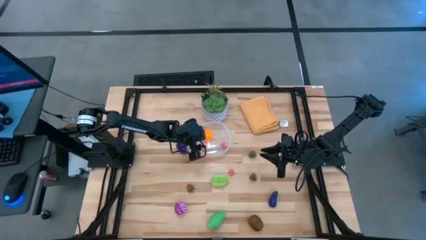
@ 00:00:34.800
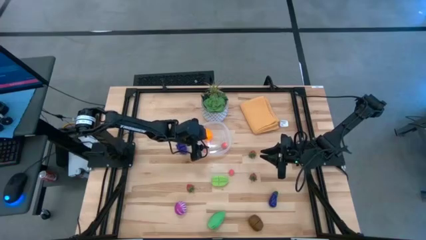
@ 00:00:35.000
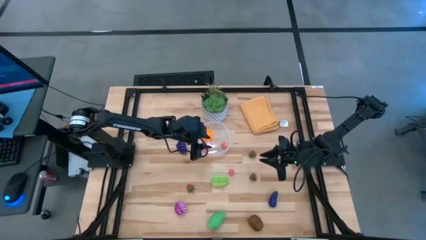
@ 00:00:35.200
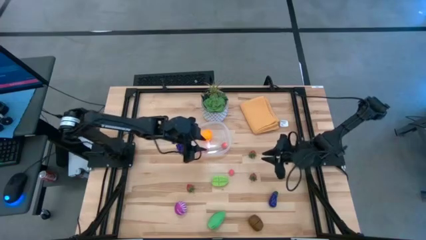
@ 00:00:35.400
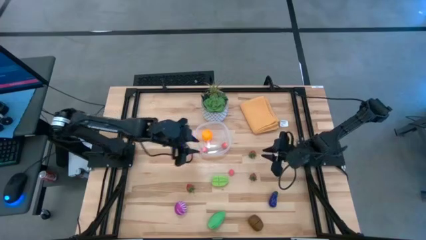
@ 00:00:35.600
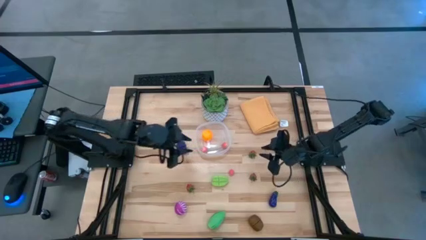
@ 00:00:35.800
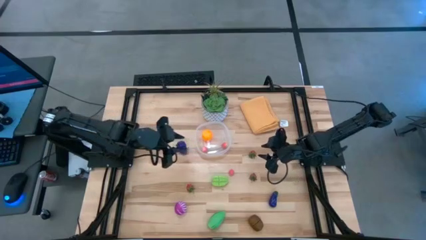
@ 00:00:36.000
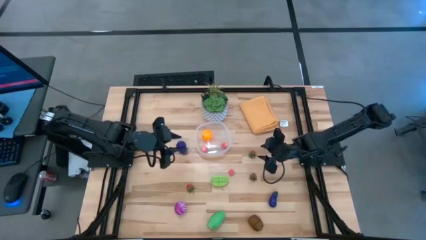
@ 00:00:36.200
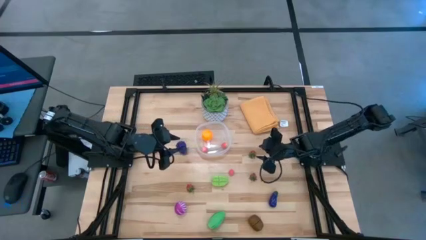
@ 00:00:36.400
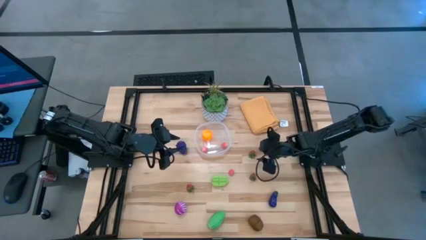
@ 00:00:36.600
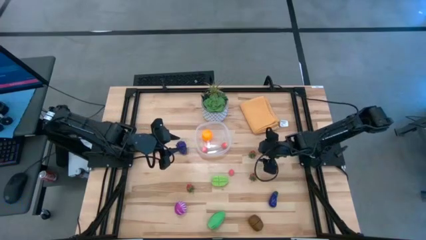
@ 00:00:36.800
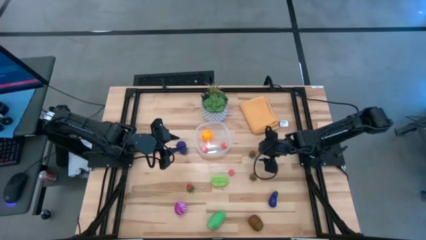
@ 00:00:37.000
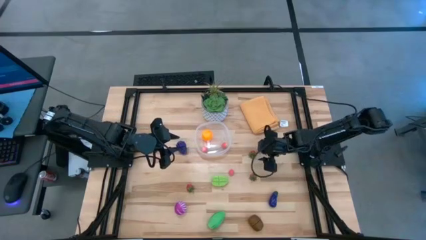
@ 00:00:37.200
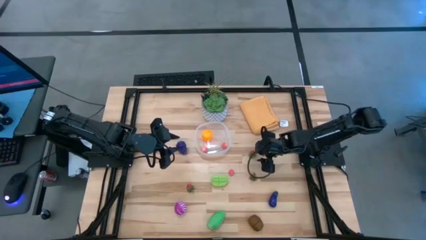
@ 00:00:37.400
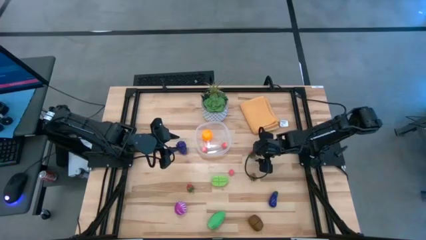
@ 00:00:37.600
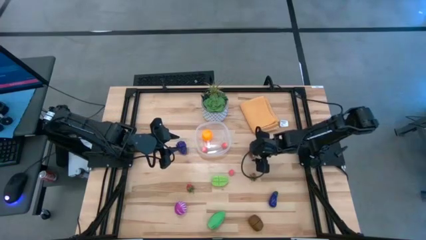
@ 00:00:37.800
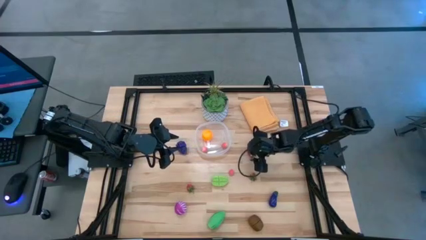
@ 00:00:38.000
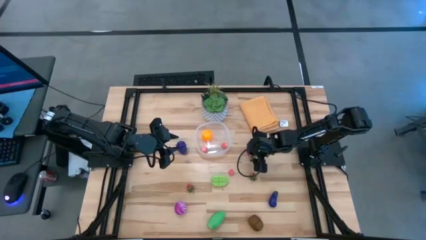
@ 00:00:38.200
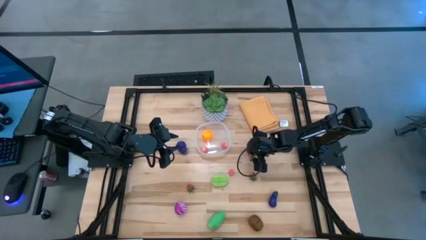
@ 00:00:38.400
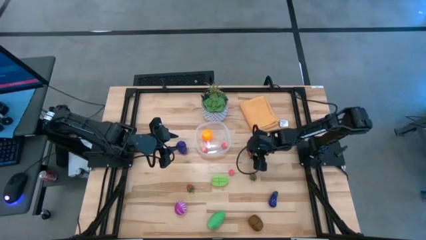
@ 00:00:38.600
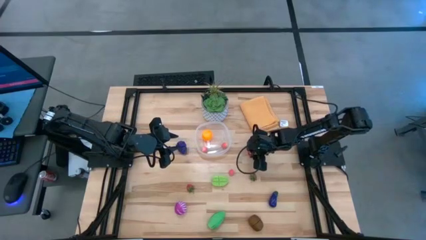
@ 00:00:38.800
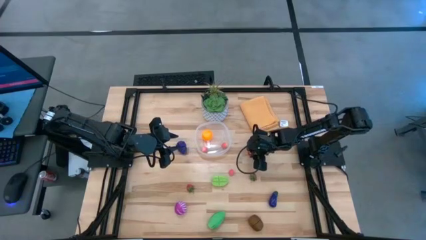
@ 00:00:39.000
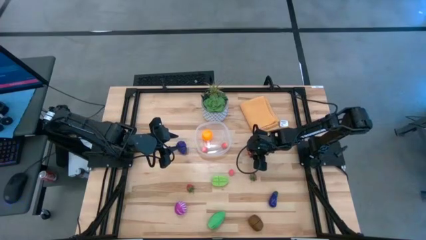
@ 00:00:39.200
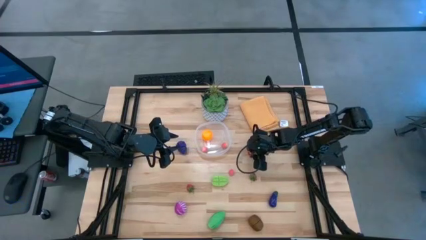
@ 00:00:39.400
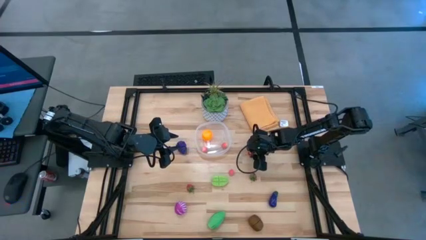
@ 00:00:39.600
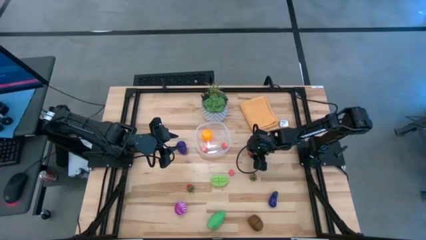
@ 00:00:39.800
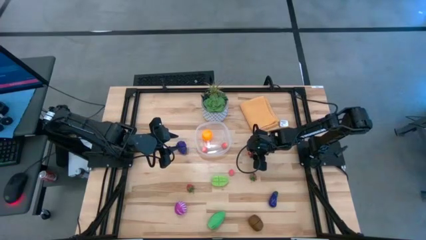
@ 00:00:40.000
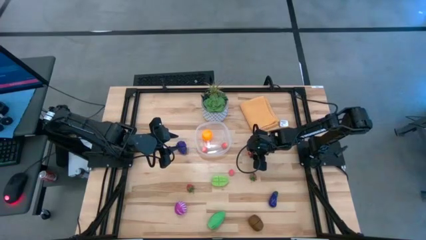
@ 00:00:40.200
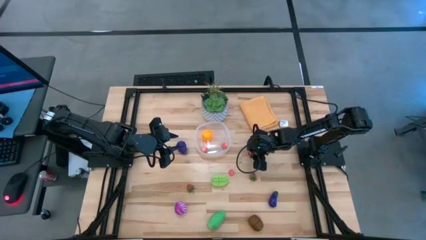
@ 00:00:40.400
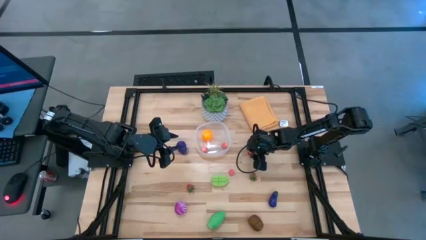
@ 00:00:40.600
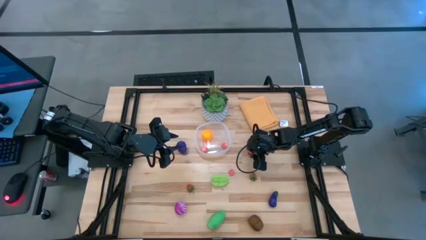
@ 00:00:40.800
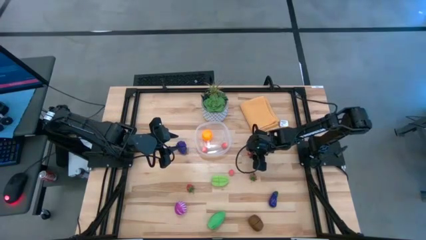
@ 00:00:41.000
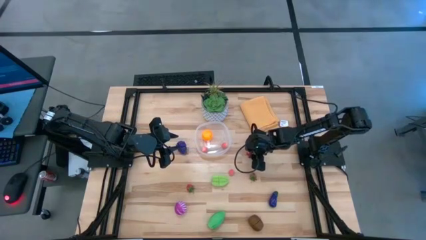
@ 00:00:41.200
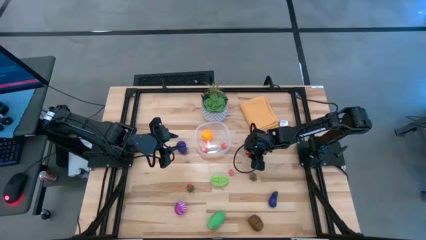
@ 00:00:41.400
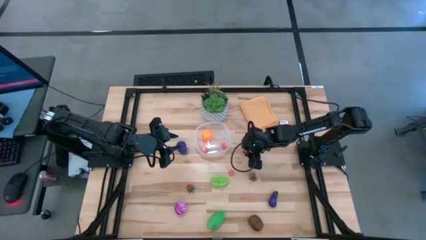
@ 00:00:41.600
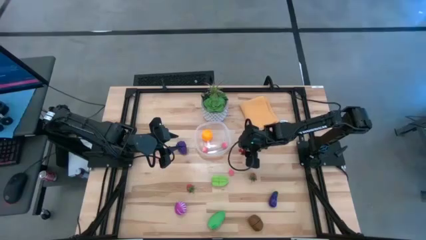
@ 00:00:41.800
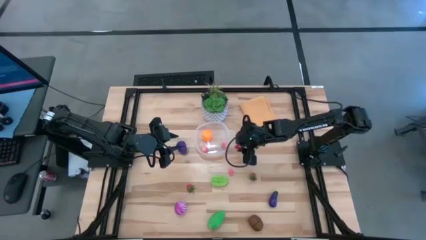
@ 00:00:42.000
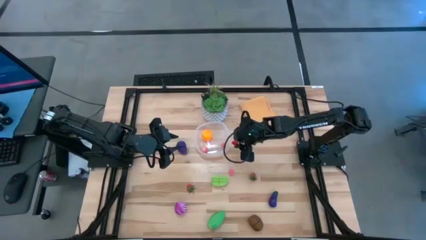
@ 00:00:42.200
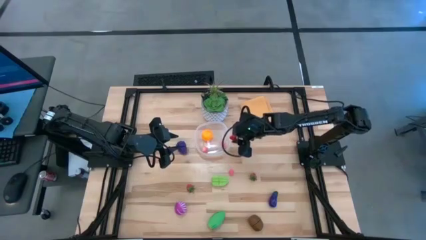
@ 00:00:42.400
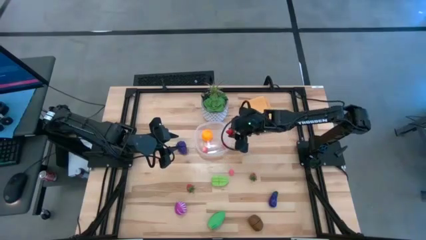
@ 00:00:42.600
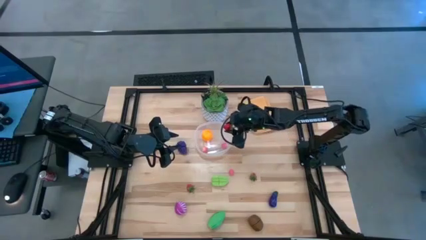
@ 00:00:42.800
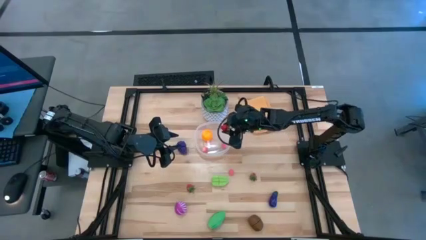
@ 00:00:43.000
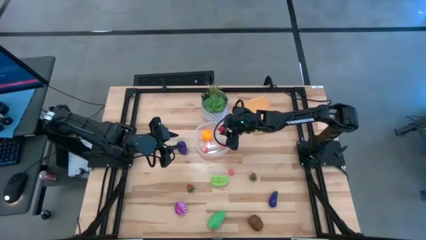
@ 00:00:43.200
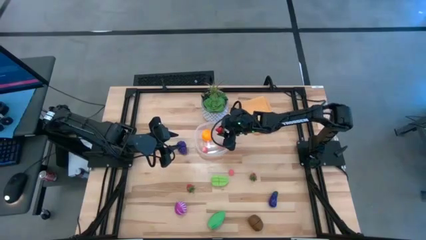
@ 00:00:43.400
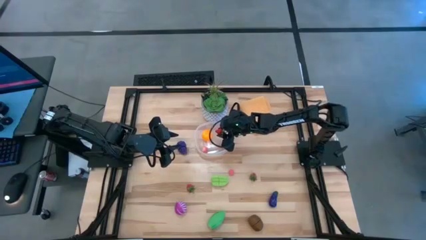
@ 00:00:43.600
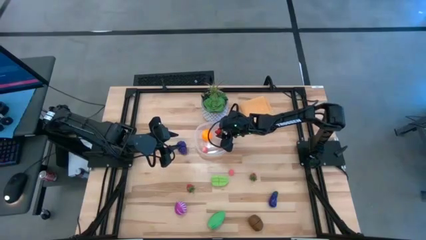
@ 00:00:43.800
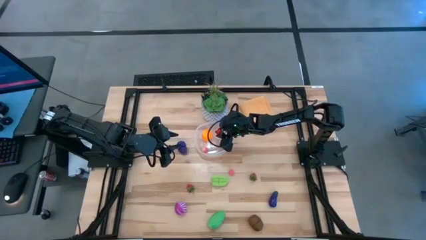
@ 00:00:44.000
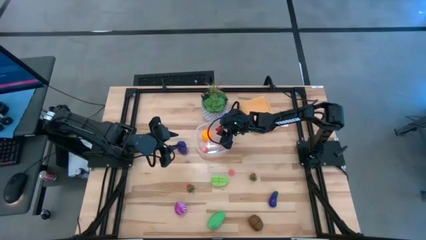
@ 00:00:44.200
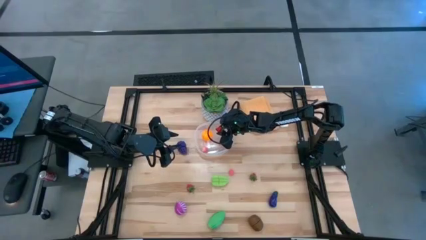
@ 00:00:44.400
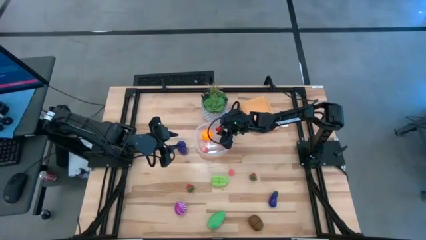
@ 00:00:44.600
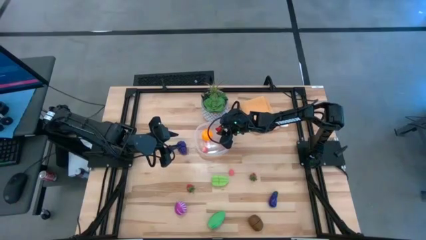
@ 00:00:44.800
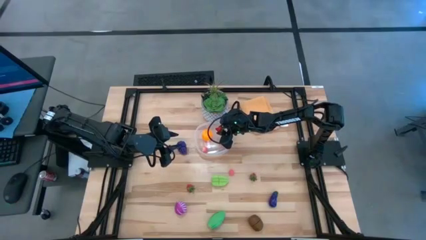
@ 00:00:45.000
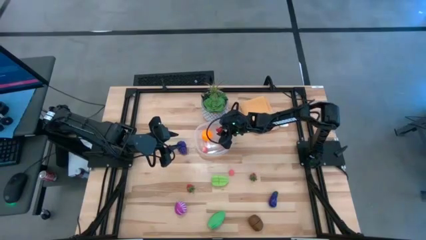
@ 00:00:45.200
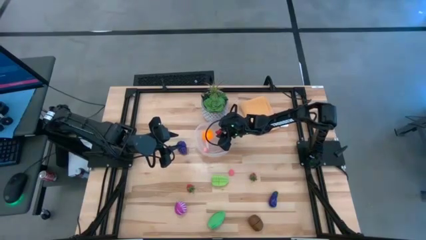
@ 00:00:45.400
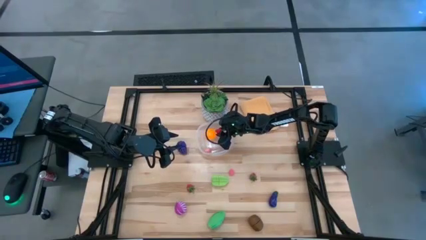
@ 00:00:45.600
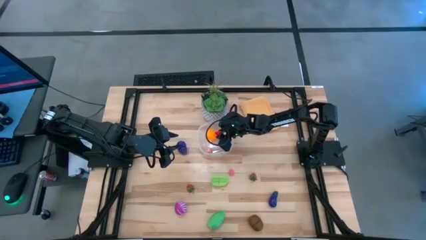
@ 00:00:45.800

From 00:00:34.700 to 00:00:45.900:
Task: Pick and placing Produce into tupperware
Put the top right red strawberry into the transparent bin
